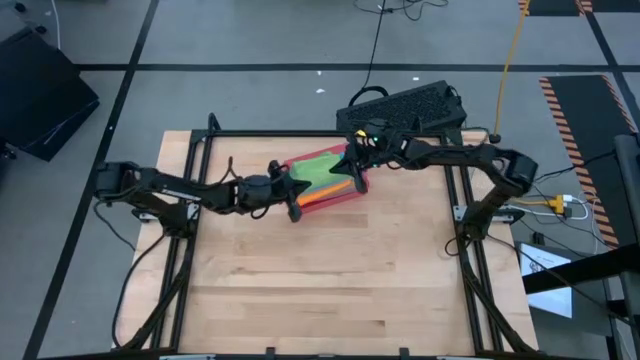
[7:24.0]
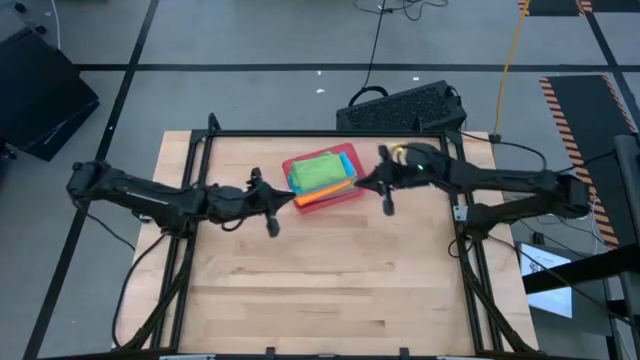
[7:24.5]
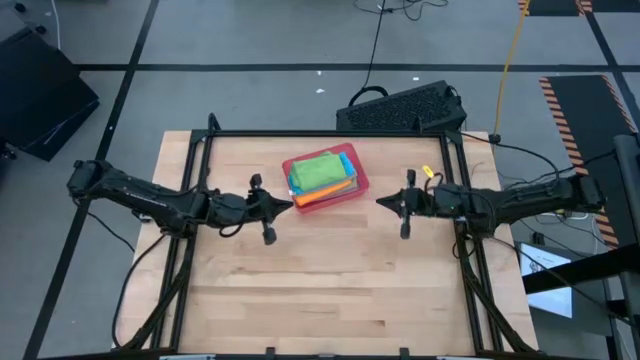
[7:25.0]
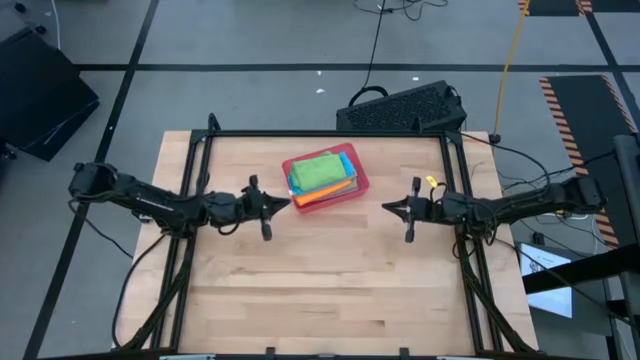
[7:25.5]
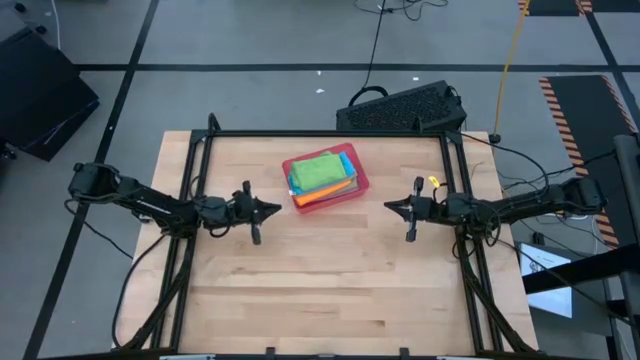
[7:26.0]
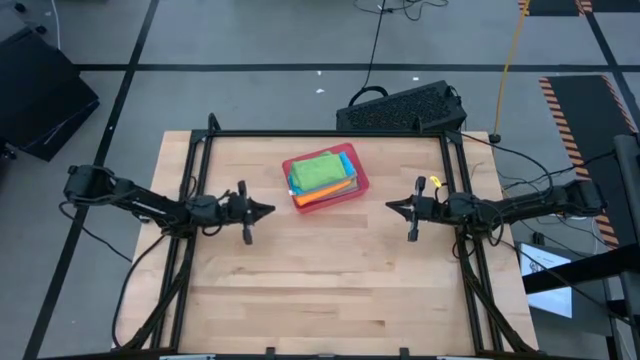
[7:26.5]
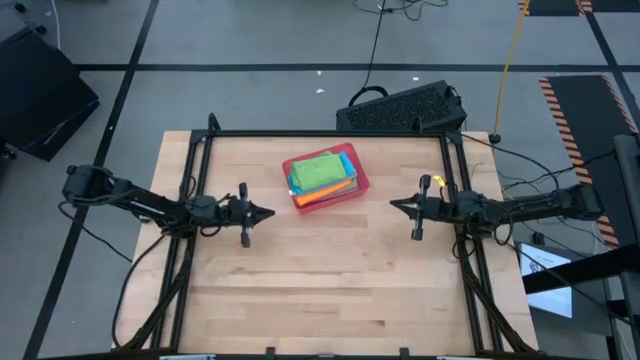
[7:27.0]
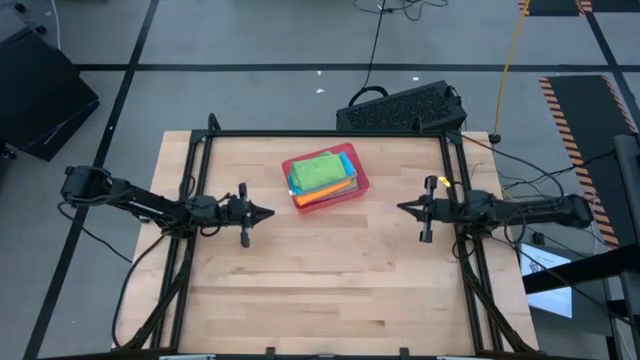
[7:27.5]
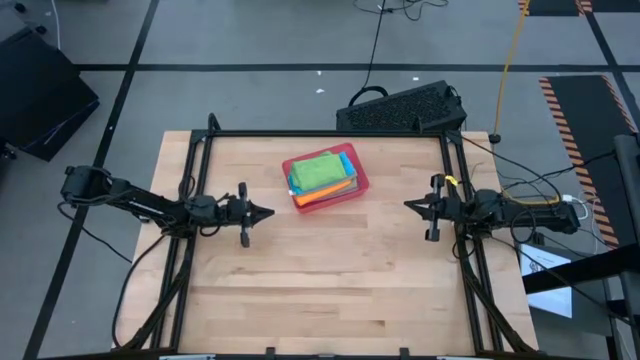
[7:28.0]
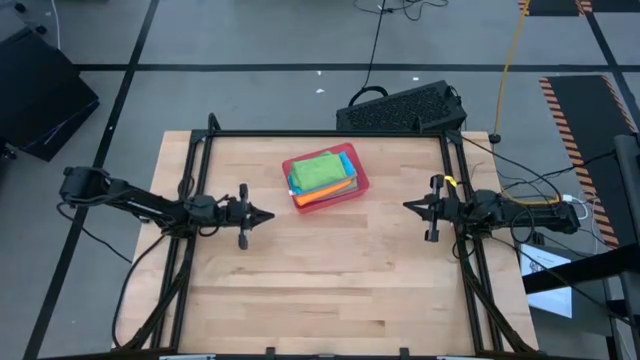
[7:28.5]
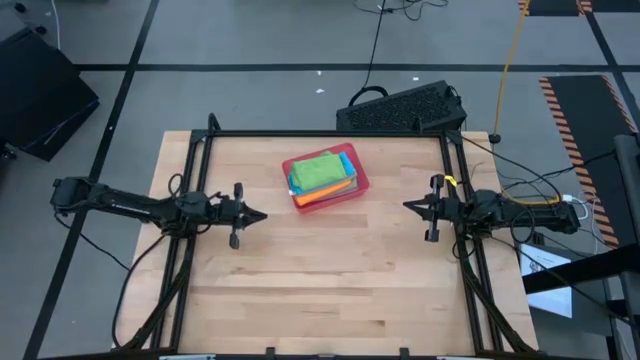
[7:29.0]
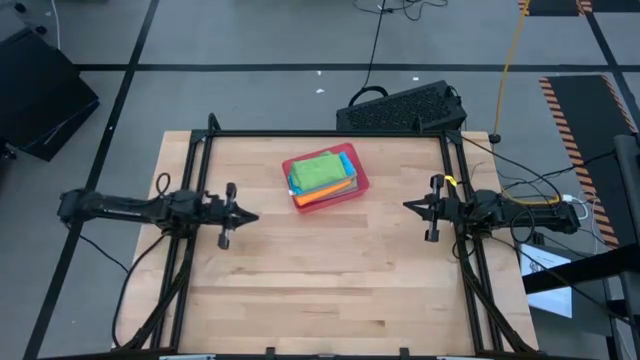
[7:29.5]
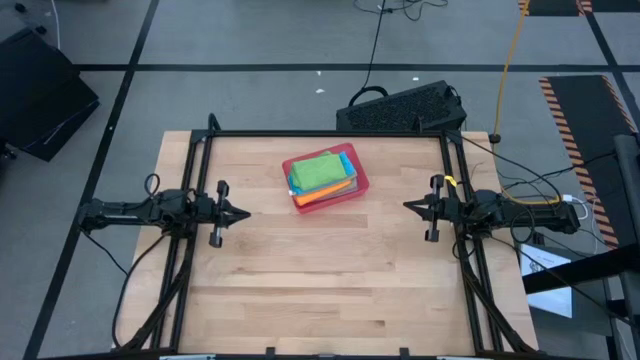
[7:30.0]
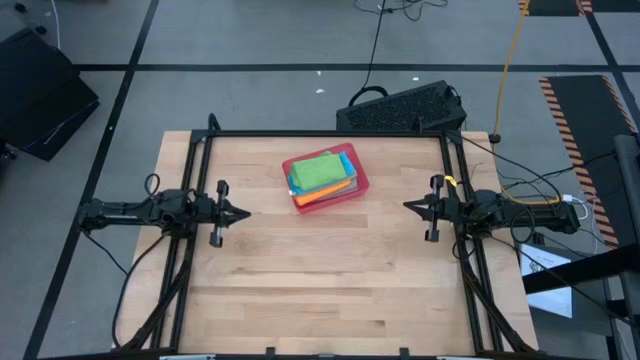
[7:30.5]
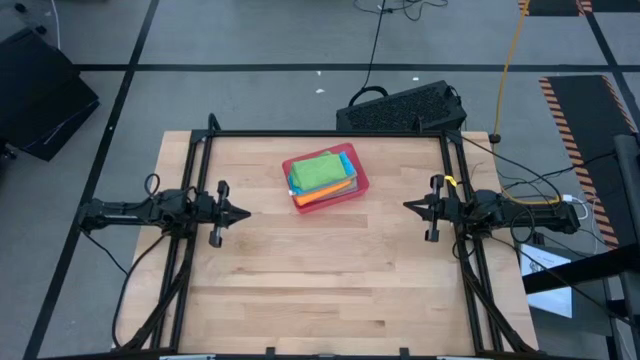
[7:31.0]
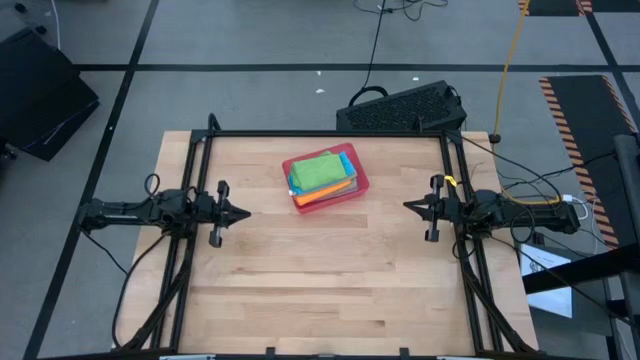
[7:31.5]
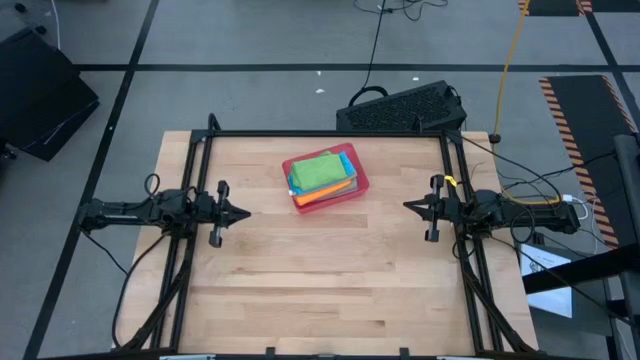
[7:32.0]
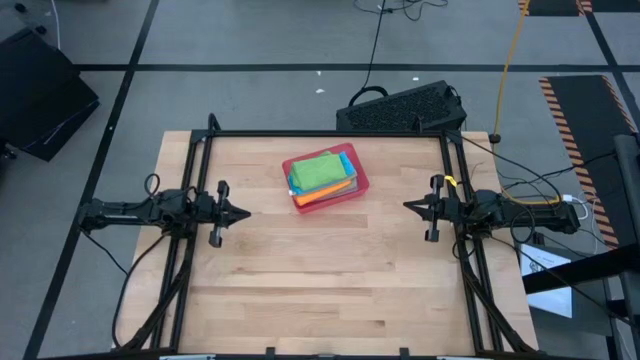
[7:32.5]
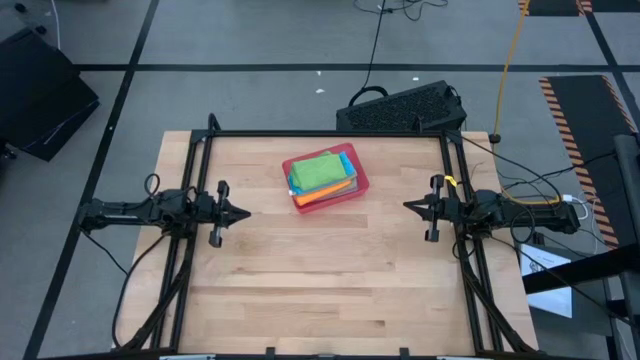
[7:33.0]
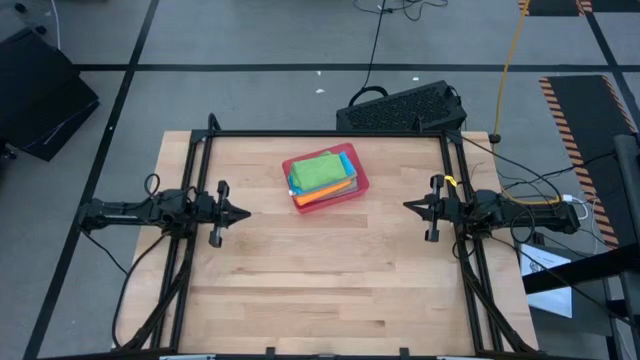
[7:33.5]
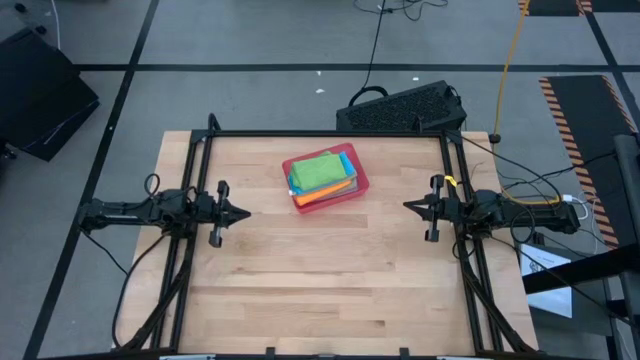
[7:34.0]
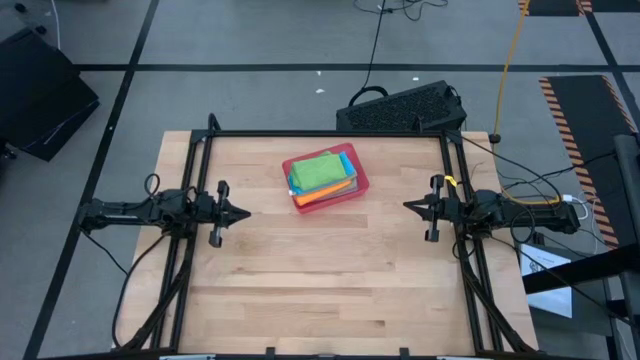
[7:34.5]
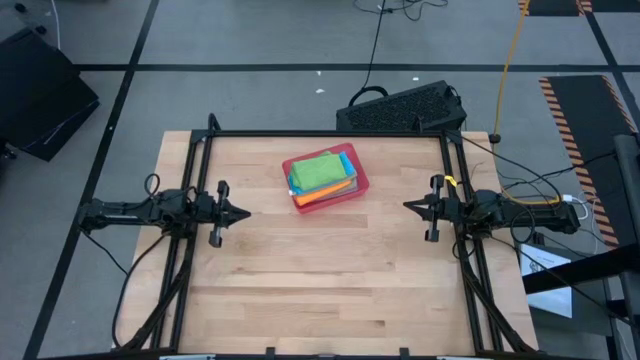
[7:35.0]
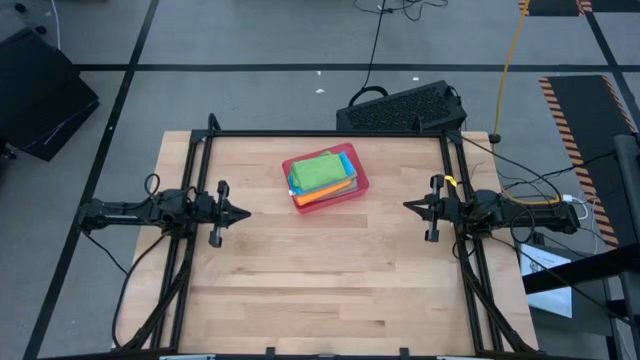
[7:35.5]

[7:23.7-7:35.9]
Task: Fold microfiber towels
Return to Home Position
